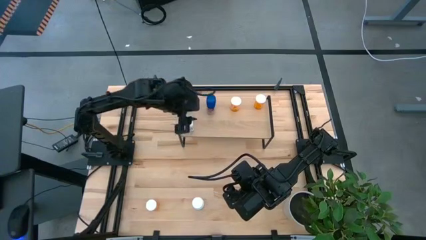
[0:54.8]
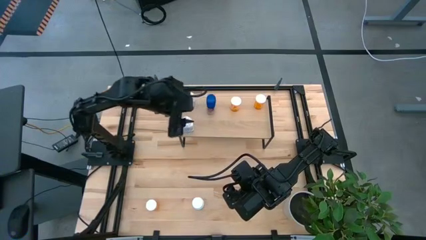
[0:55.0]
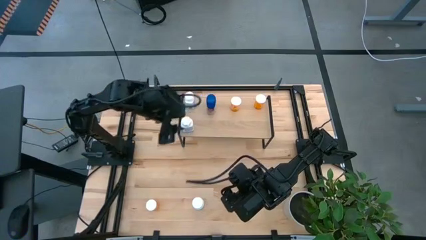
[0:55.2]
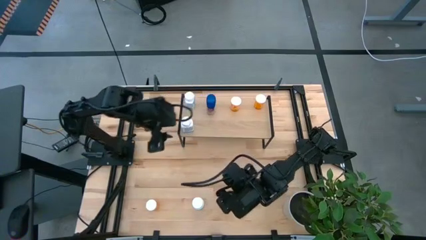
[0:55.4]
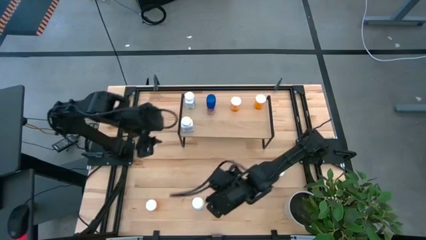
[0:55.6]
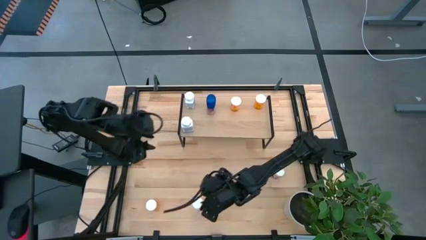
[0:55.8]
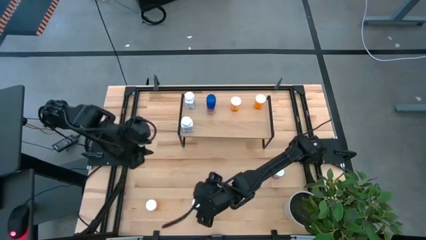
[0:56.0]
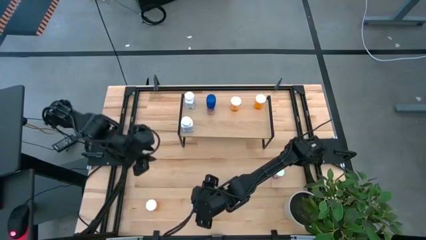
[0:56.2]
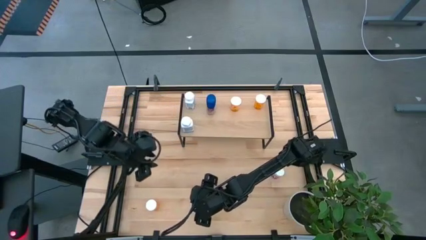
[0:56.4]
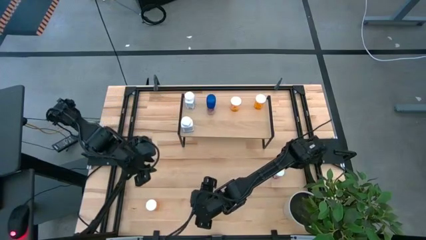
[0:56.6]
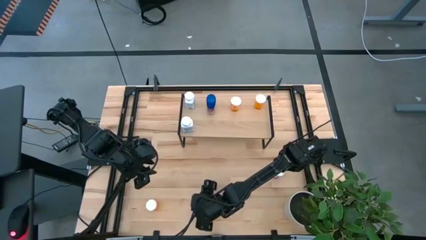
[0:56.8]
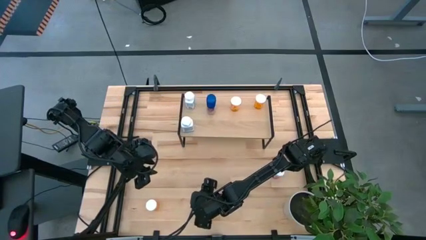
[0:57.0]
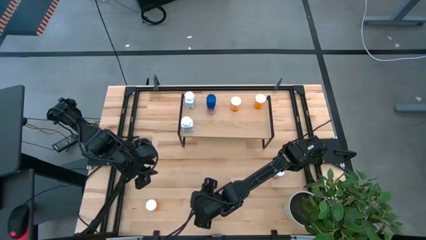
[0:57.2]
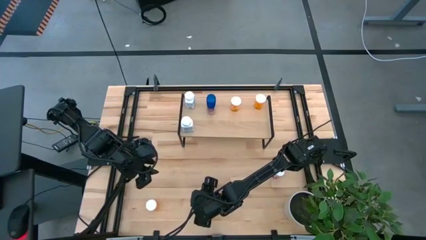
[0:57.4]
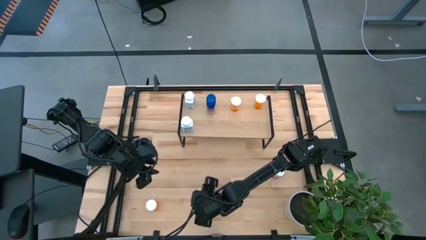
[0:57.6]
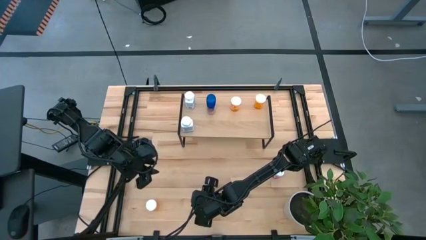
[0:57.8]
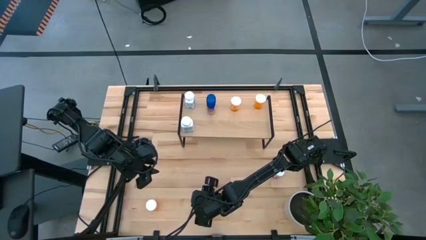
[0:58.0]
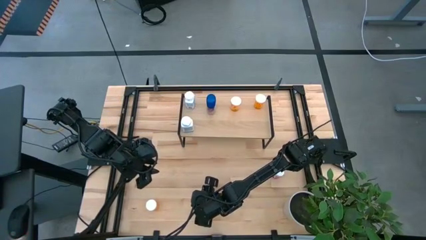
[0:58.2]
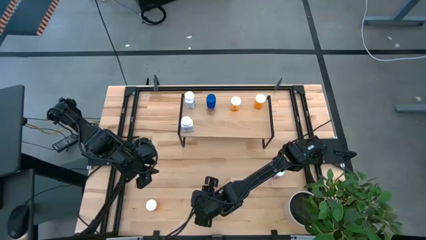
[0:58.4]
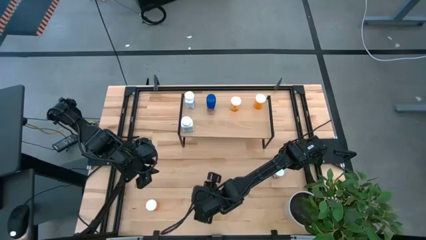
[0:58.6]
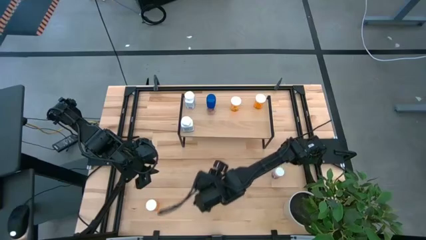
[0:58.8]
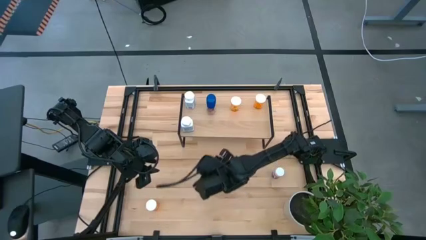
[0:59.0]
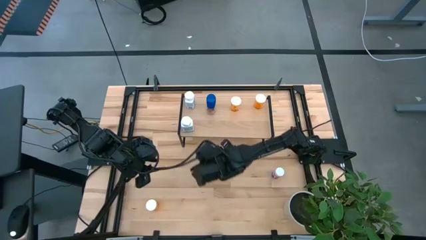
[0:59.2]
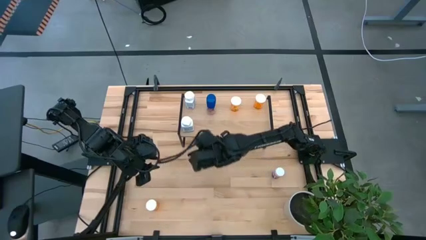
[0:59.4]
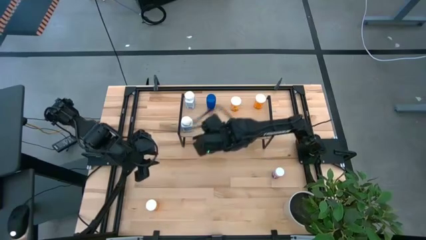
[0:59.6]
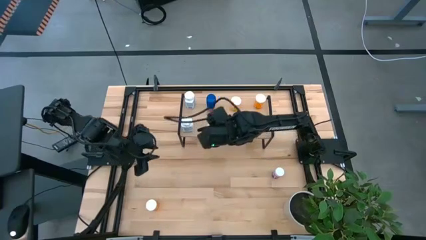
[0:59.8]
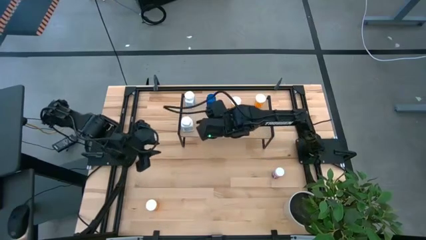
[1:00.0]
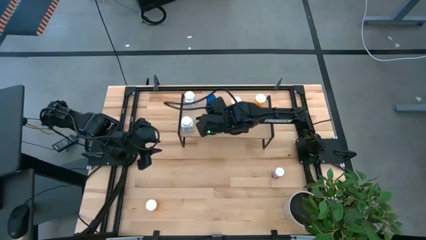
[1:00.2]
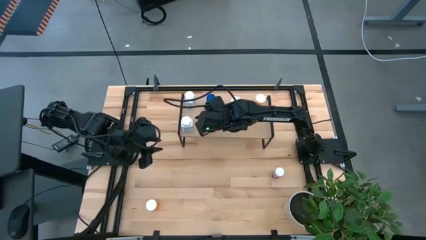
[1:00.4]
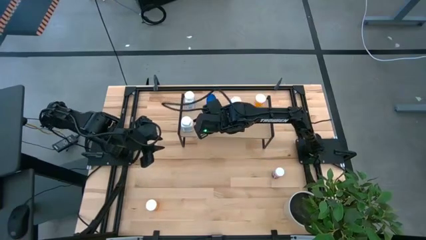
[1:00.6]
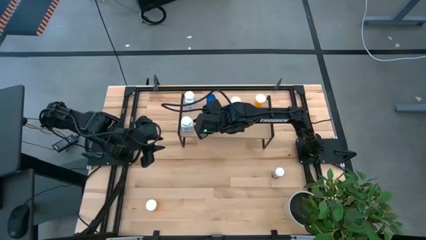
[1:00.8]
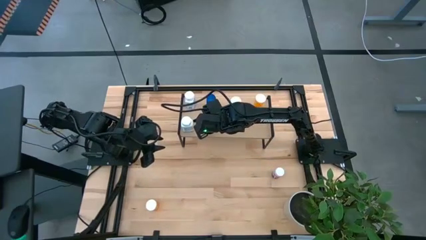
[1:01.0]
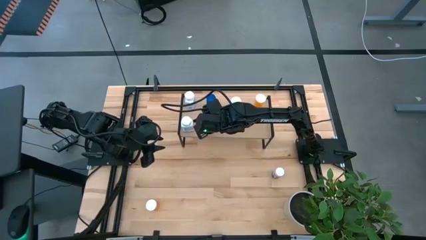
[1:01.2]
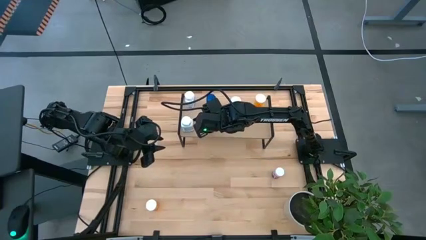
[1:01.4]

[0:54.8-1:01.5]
Task: Pick and place medicine bottles onto shelf by color
Put the white green pill bottle on the shelf

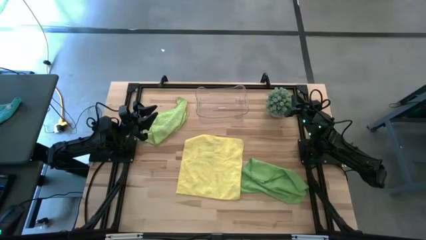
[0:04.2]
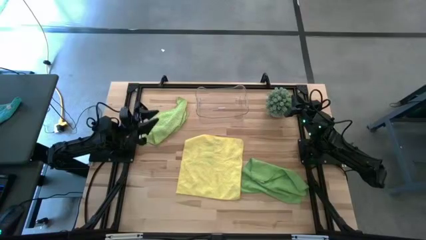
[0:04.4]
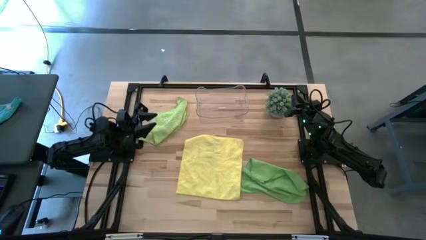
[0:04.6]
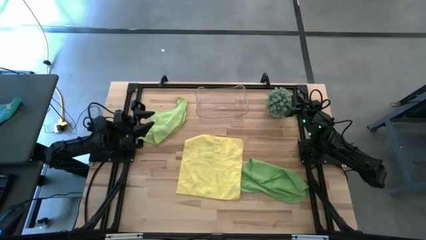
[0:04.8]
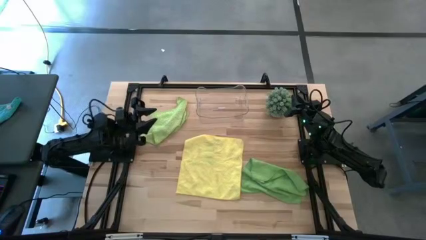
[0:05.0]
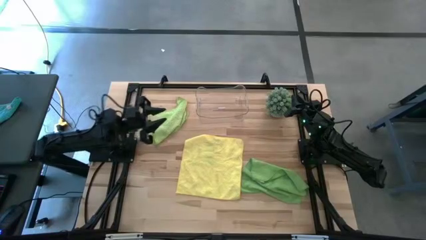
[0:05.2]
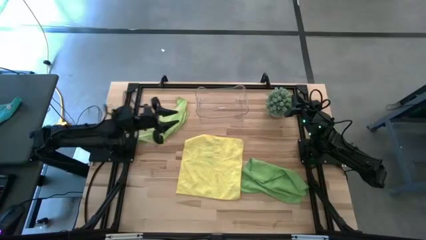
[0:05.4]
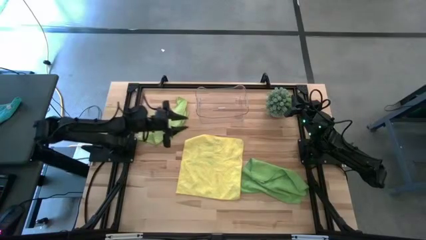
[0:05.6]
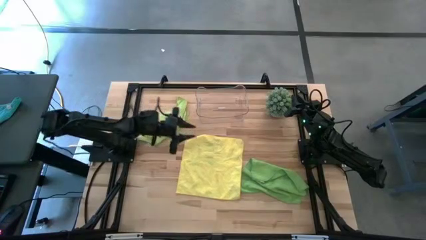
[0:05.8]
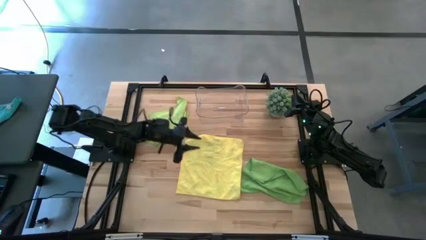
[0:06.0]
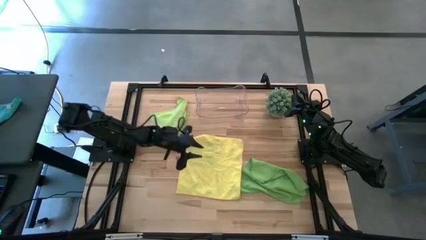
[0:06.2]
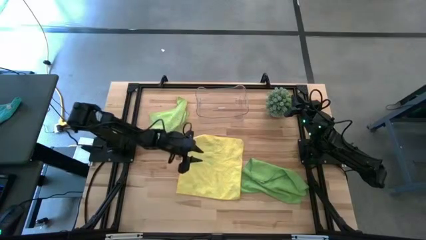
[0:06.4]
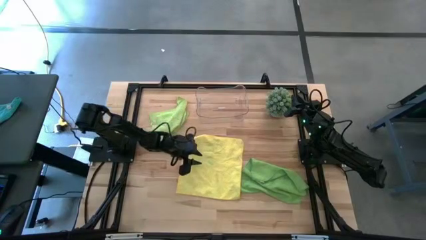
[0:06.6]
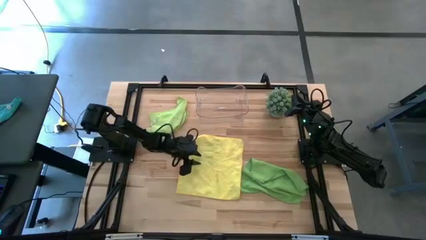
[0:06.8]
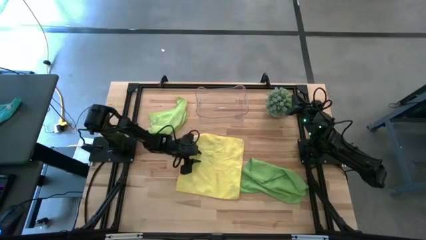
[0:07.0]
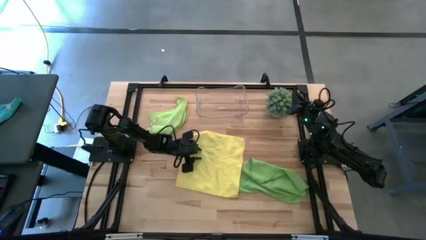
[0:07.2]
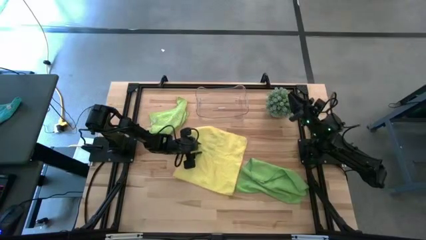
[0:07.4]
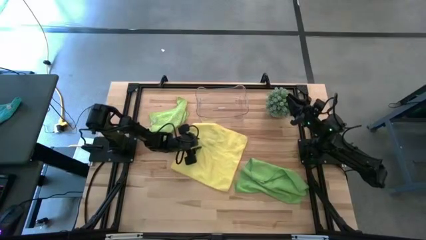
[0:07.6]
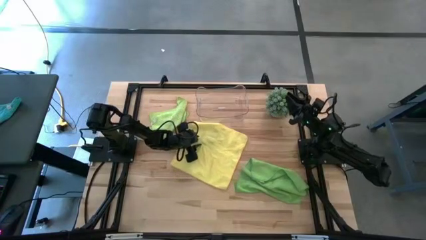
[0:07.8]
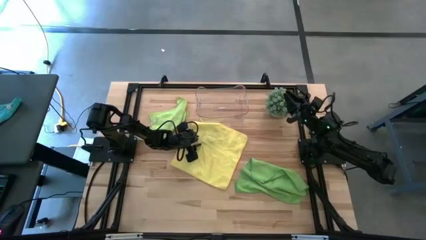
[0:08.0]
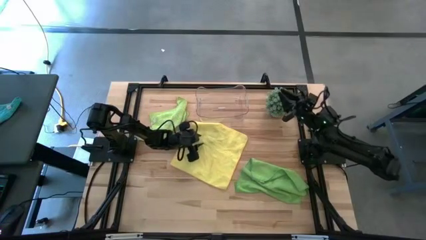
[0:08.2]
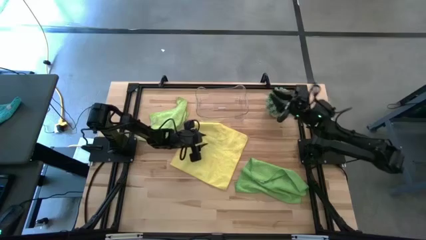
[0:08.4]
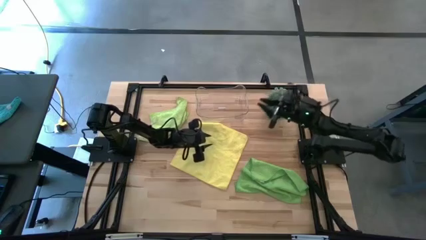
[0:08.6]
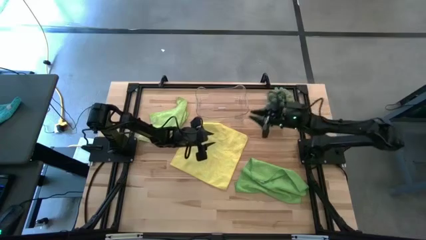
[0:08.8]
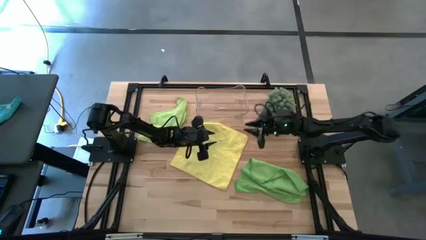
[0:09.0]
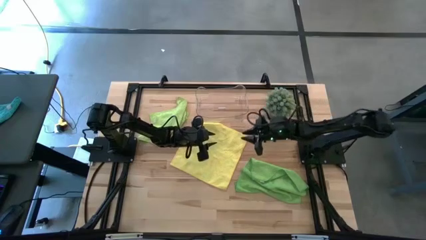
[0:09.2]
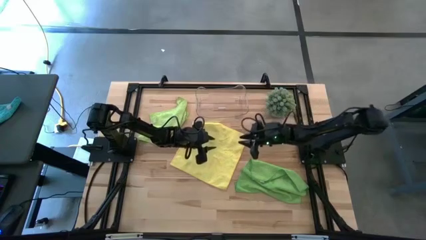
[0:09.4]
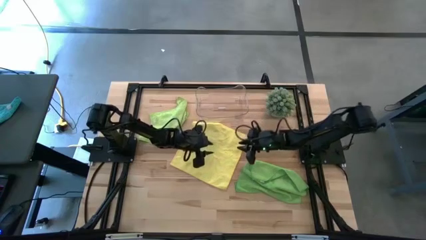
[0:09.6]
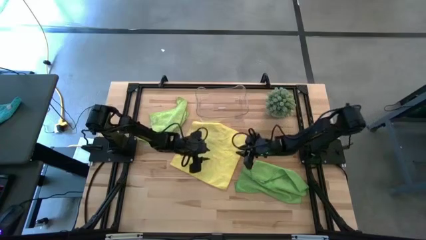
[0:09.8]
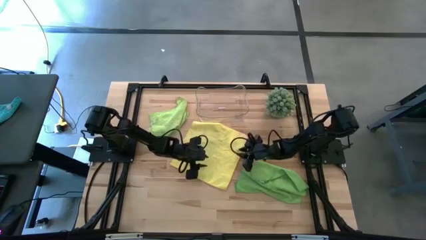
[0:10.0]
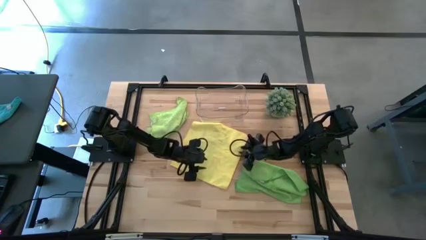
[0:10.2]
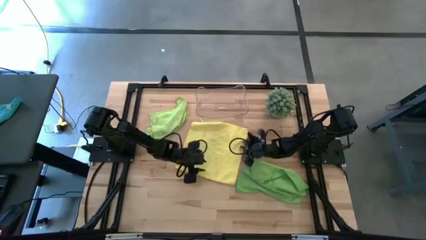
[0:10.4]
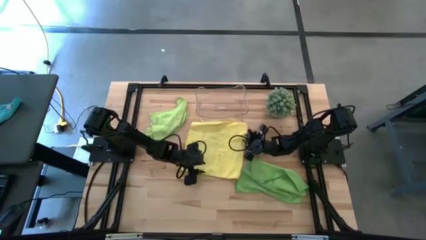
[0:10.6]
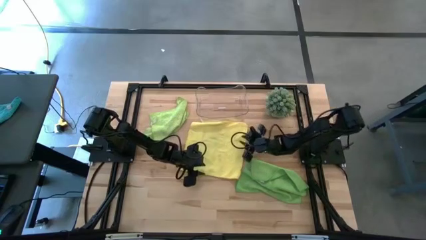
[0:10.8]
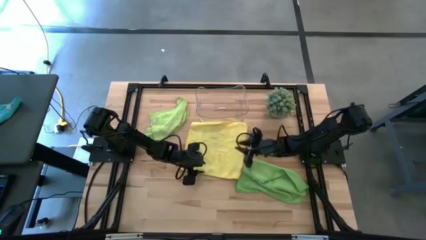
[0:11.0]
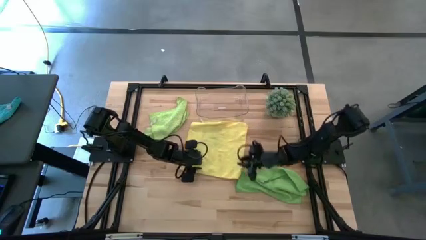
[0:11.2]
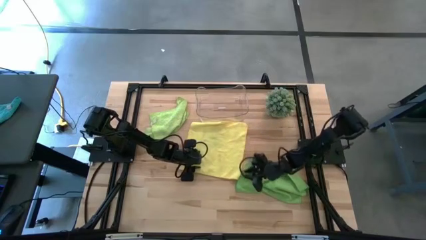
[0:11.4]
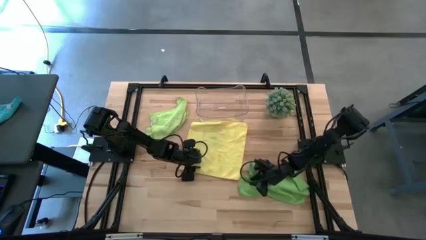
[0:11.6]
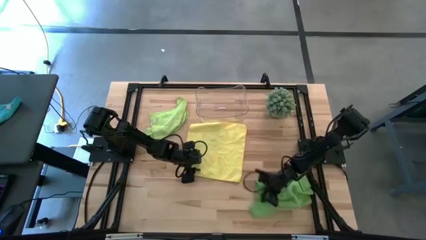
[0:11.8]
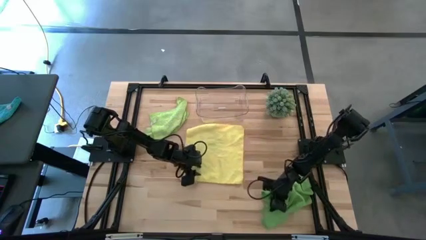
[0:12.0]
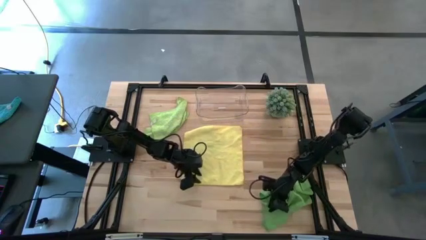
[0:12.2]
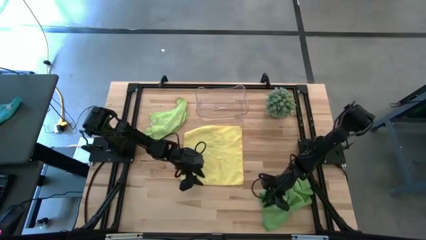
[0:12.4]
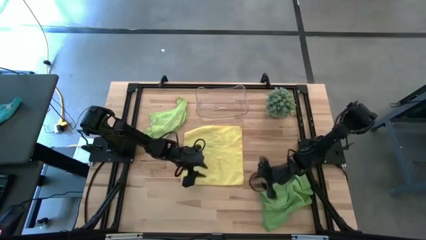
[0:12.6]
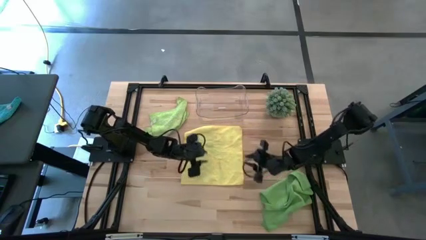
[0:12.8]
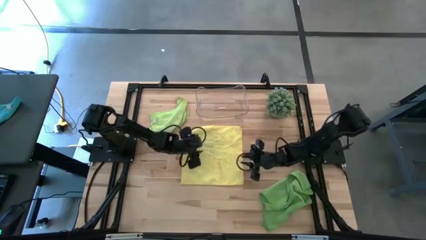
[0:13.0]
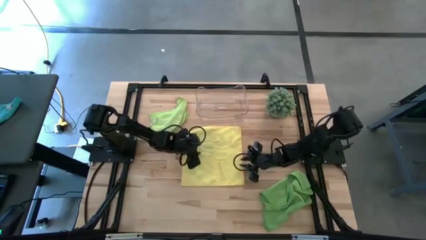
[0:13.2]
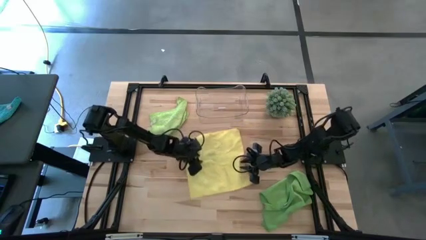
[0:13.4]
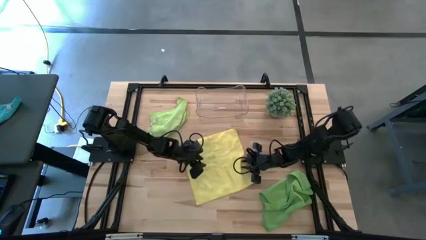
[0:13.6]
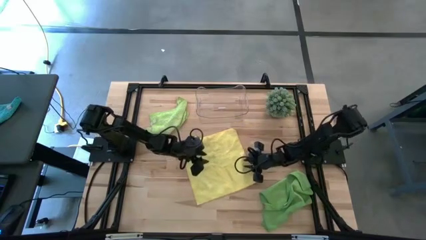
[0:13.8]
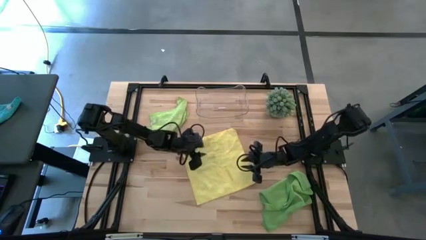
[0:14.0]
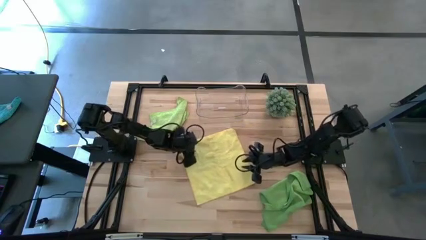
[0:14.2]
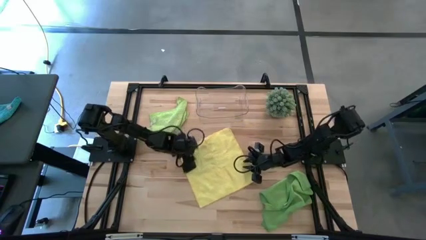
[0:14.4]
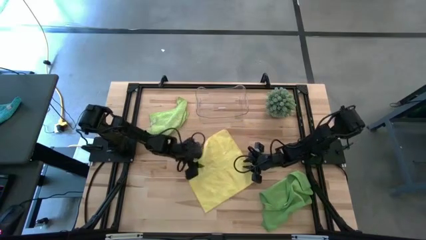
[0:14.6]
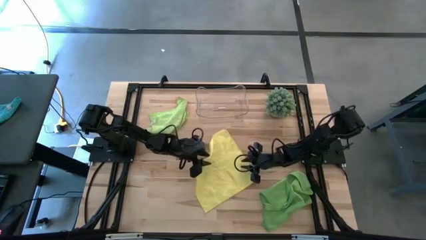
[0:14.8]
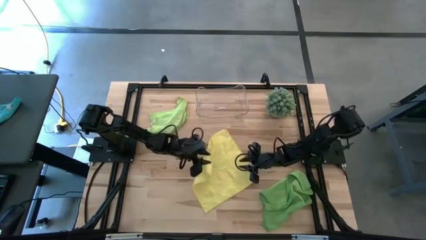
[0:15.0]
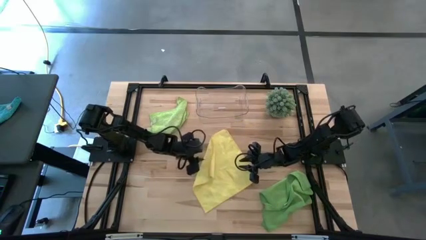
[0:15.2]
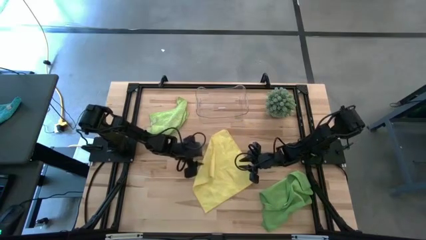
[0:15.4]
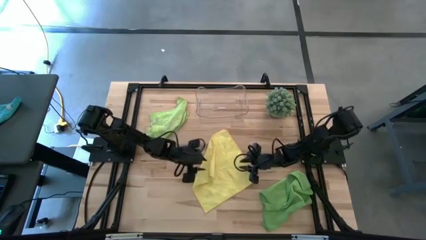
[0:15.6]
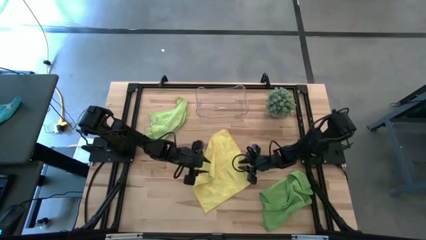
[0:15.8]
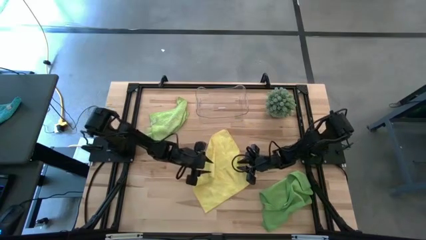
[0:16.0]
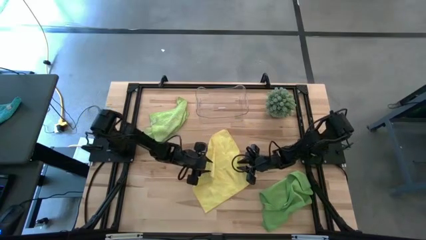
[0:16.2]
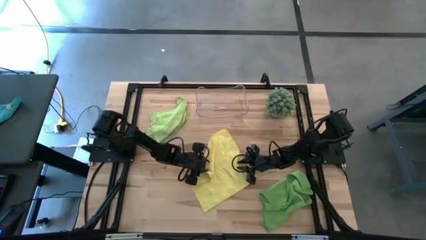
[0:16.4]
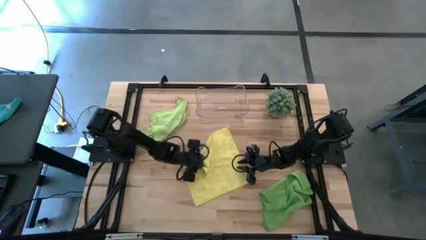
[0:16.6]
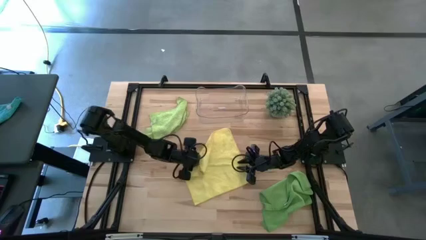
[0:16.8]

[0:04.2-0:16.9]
Task: Roll microfiber towels into tight, uniform cylinder then place into a basket
Fold the yellow microfiber towel
